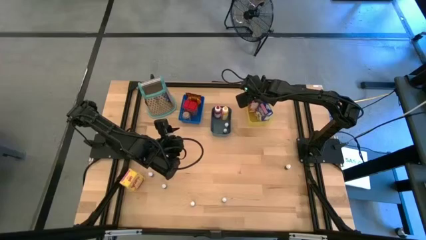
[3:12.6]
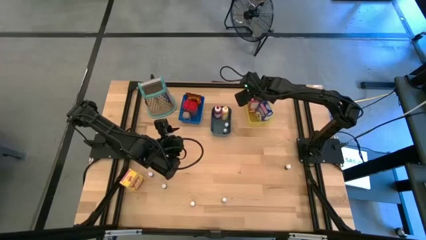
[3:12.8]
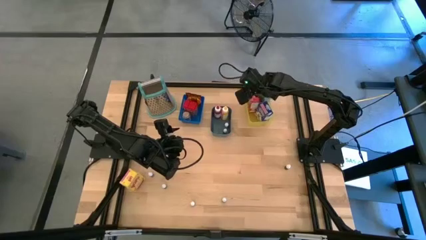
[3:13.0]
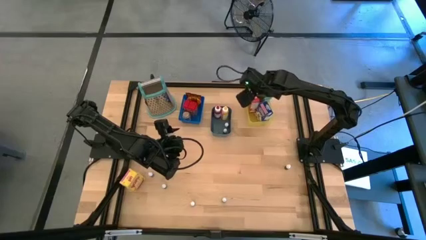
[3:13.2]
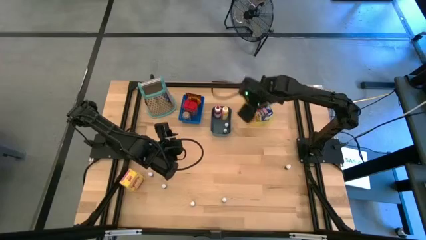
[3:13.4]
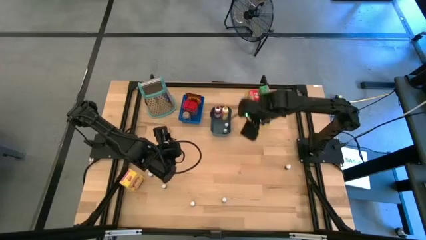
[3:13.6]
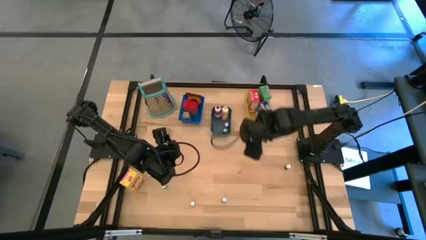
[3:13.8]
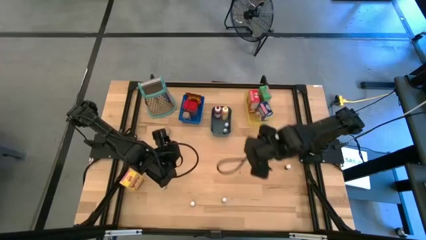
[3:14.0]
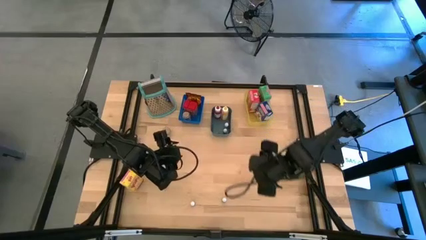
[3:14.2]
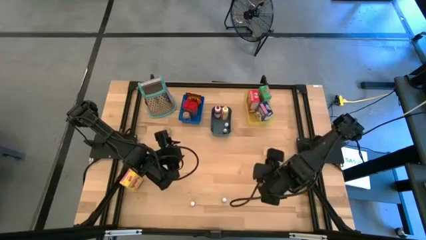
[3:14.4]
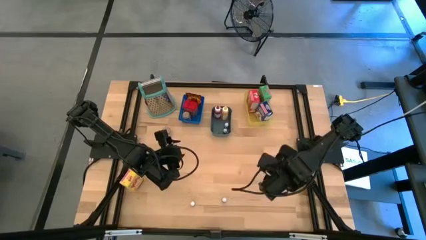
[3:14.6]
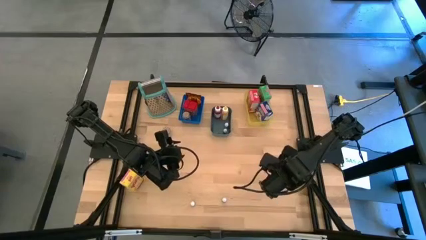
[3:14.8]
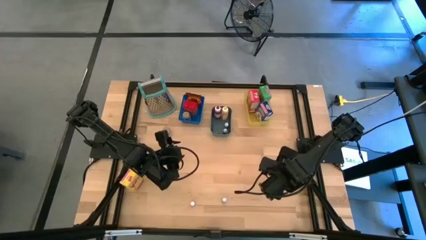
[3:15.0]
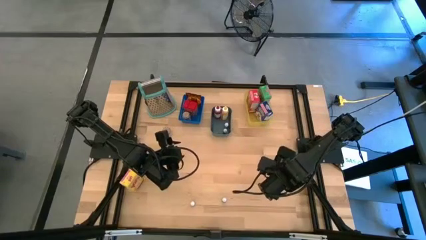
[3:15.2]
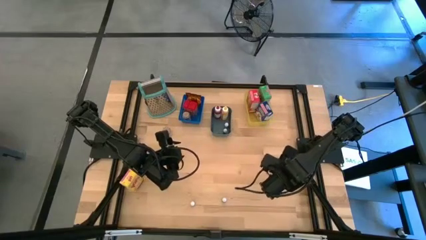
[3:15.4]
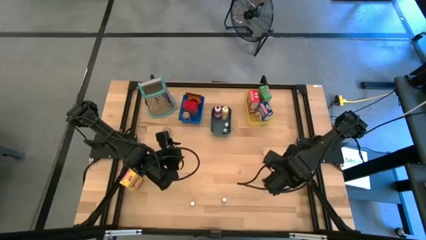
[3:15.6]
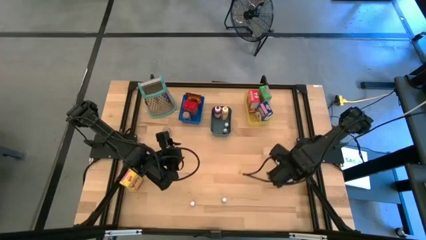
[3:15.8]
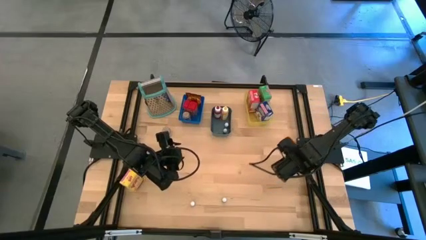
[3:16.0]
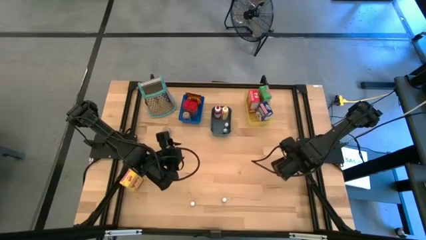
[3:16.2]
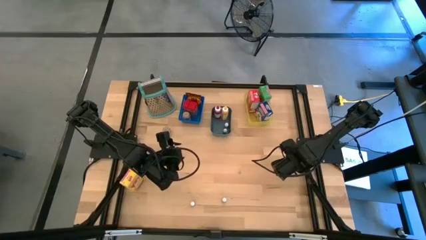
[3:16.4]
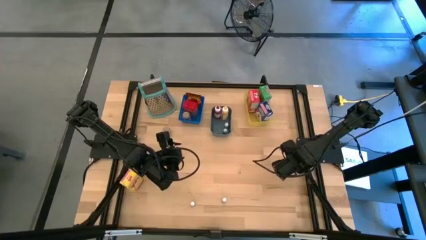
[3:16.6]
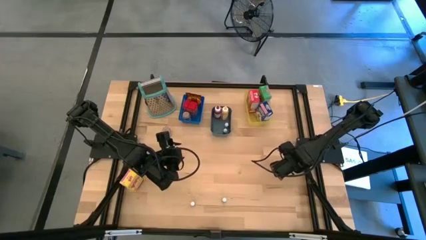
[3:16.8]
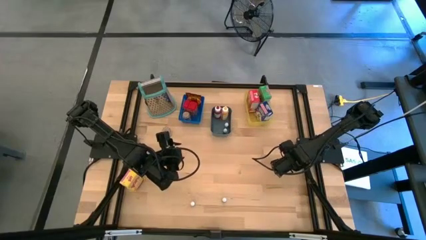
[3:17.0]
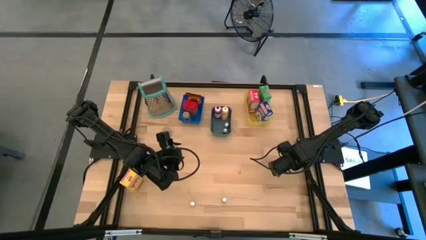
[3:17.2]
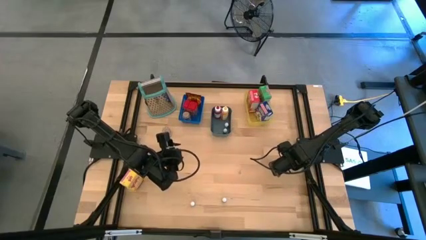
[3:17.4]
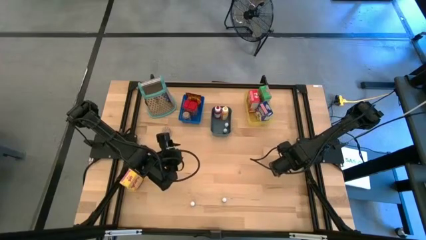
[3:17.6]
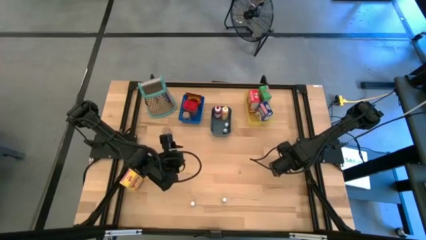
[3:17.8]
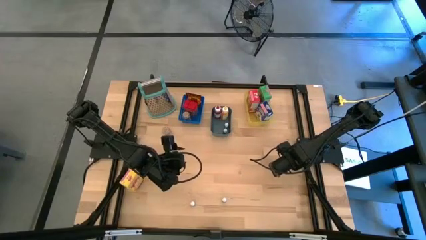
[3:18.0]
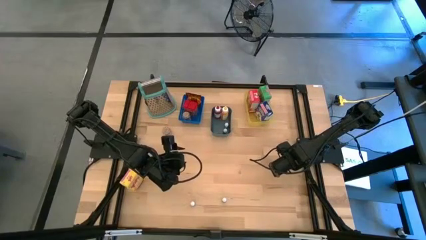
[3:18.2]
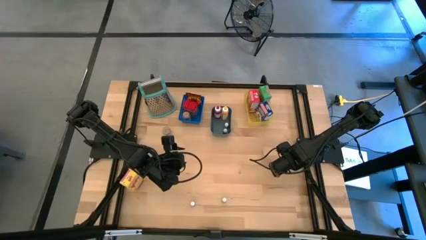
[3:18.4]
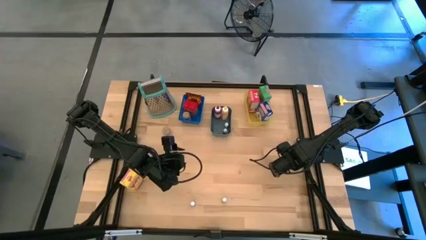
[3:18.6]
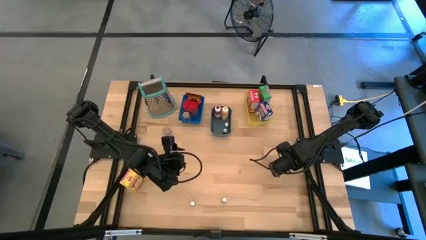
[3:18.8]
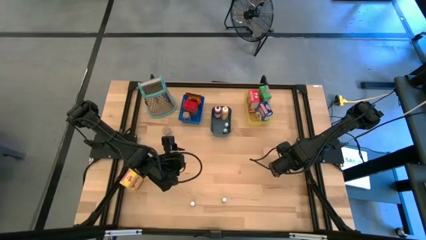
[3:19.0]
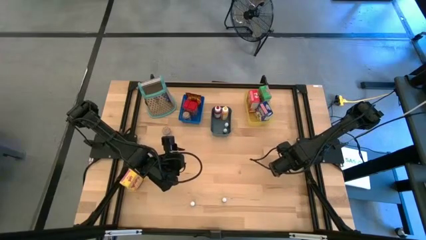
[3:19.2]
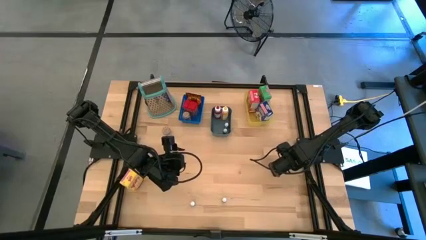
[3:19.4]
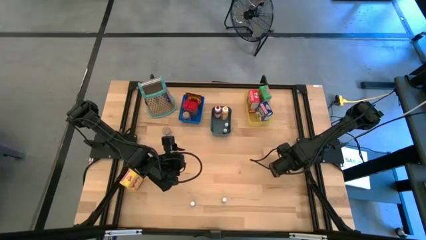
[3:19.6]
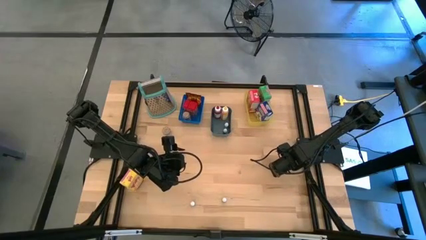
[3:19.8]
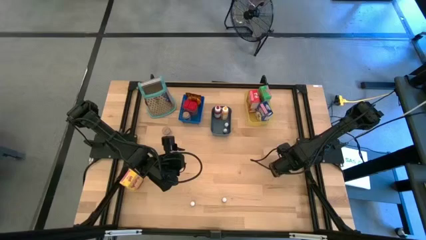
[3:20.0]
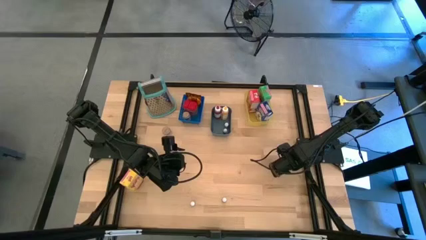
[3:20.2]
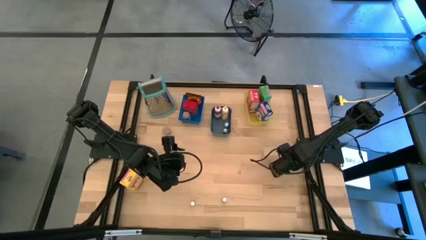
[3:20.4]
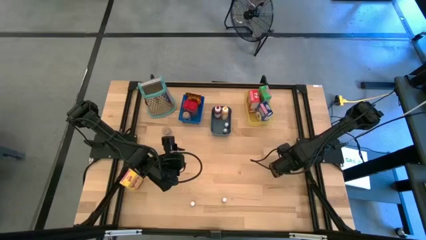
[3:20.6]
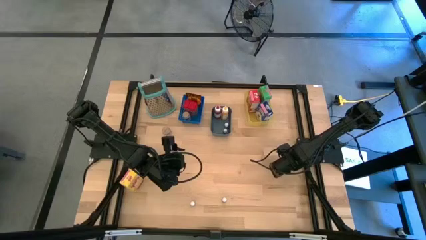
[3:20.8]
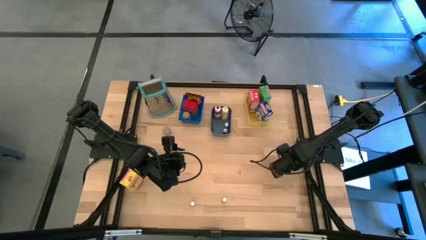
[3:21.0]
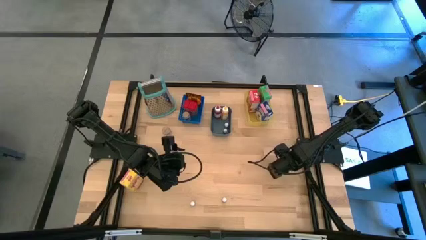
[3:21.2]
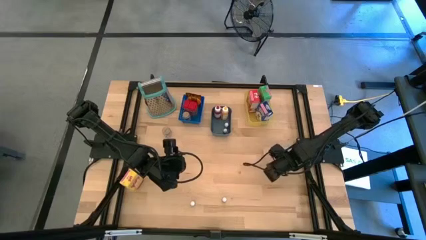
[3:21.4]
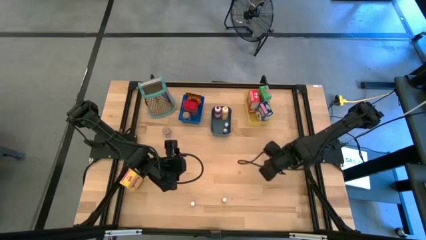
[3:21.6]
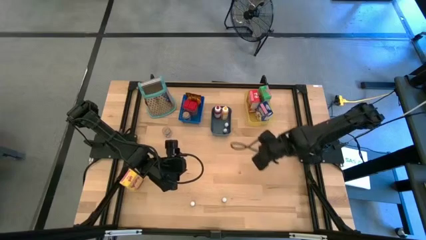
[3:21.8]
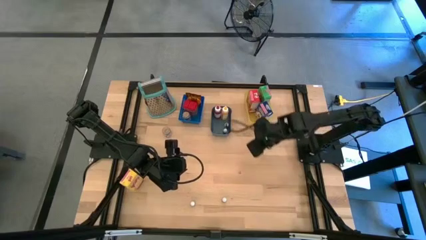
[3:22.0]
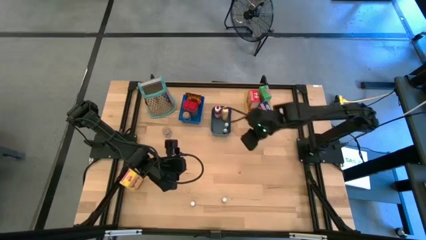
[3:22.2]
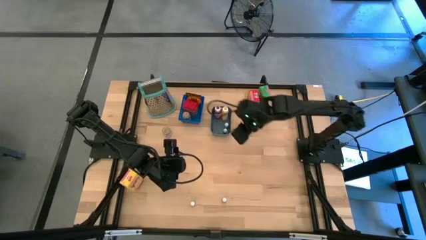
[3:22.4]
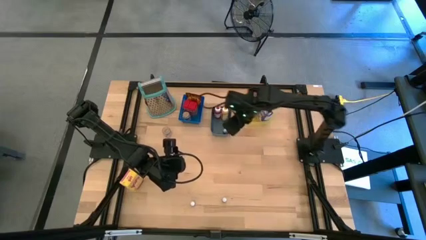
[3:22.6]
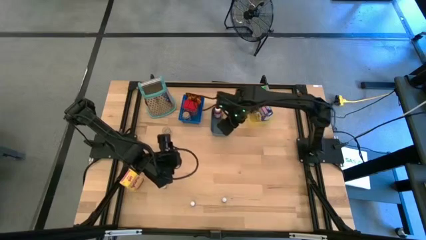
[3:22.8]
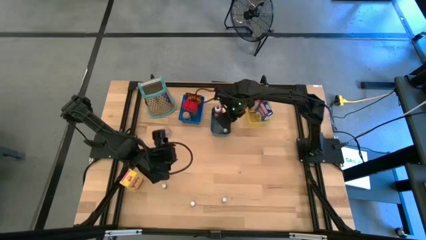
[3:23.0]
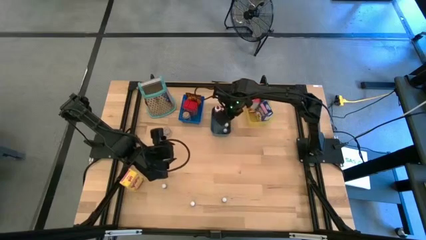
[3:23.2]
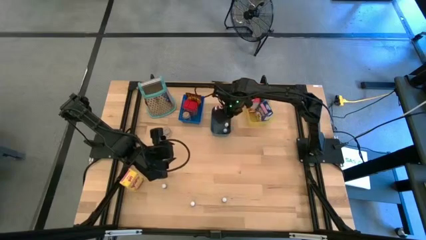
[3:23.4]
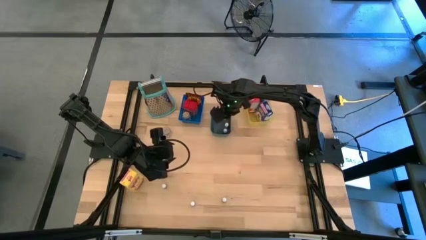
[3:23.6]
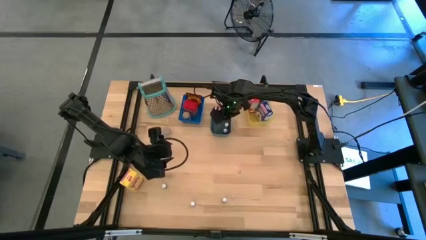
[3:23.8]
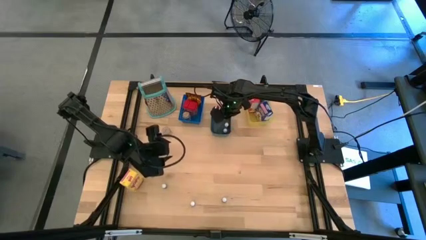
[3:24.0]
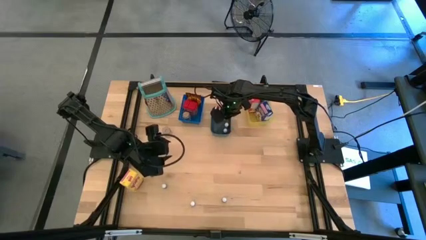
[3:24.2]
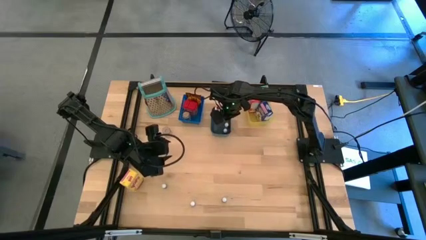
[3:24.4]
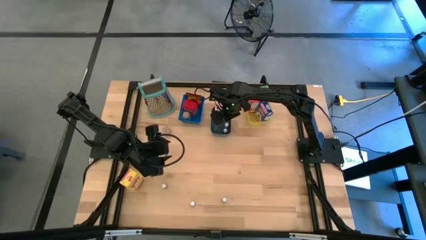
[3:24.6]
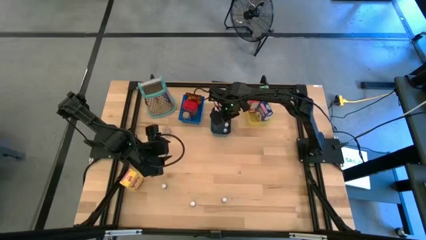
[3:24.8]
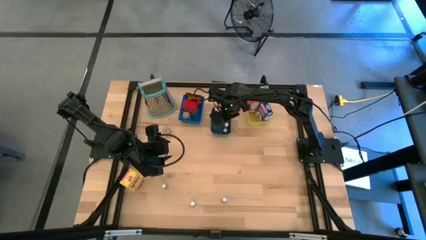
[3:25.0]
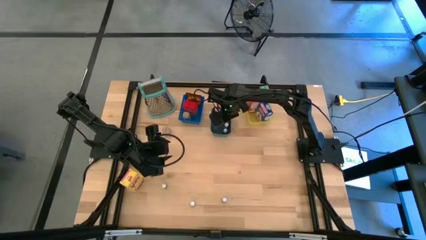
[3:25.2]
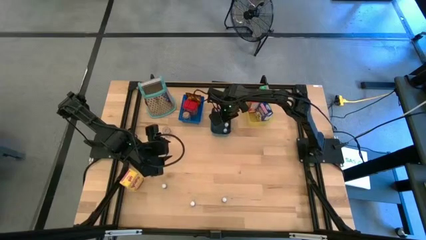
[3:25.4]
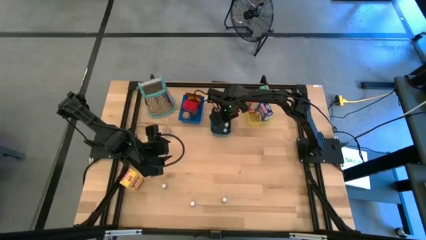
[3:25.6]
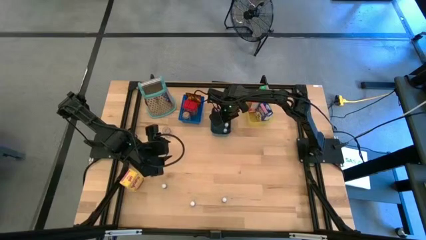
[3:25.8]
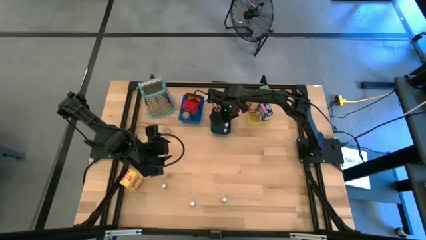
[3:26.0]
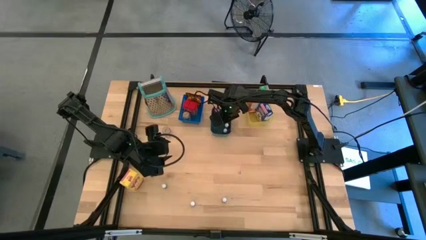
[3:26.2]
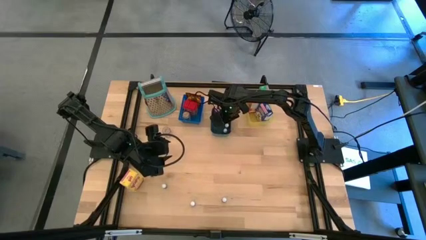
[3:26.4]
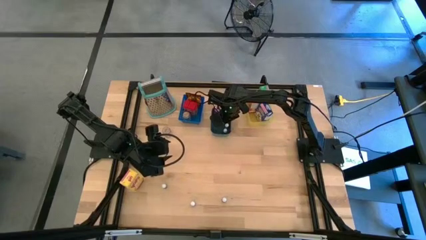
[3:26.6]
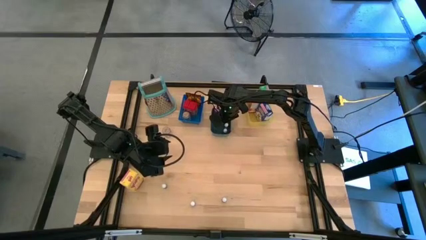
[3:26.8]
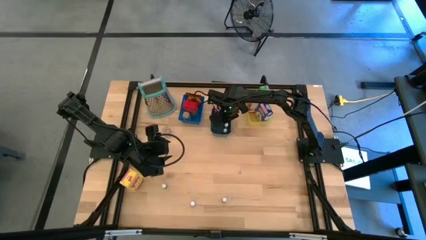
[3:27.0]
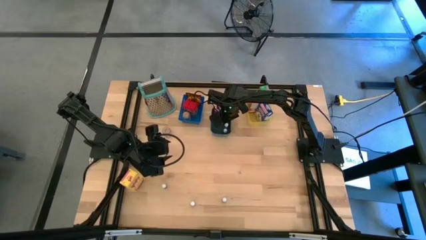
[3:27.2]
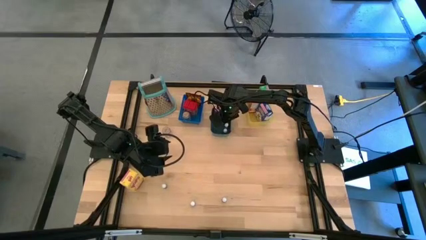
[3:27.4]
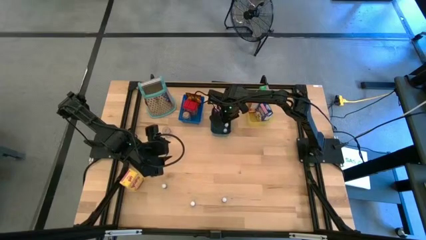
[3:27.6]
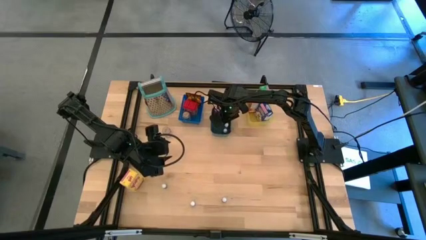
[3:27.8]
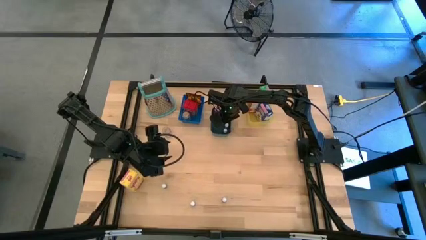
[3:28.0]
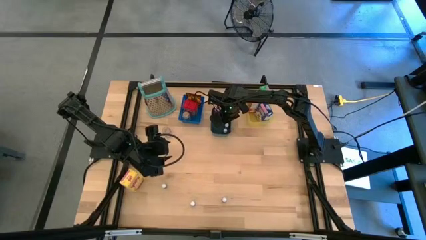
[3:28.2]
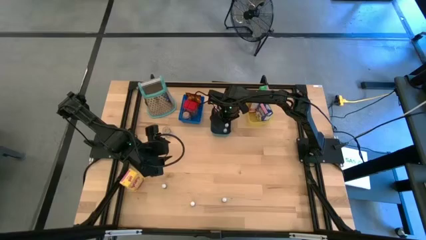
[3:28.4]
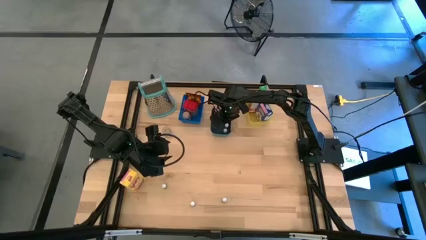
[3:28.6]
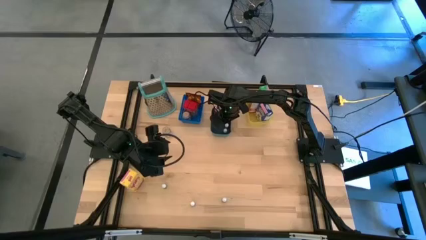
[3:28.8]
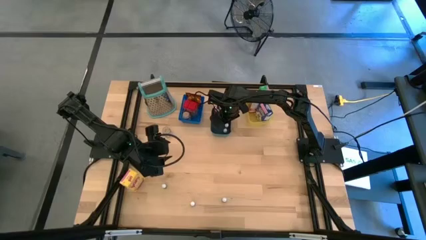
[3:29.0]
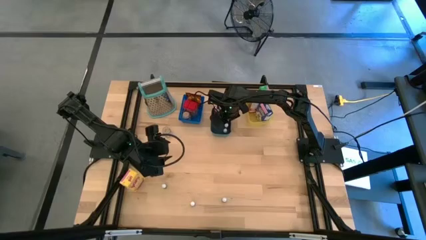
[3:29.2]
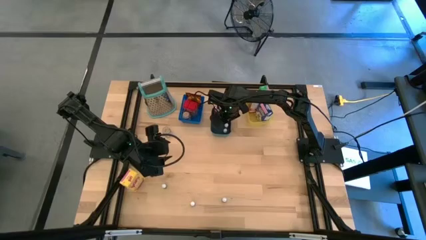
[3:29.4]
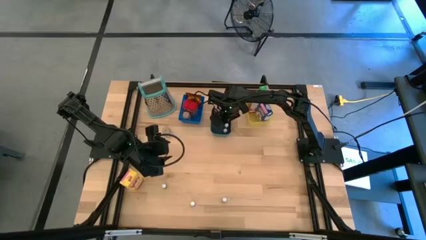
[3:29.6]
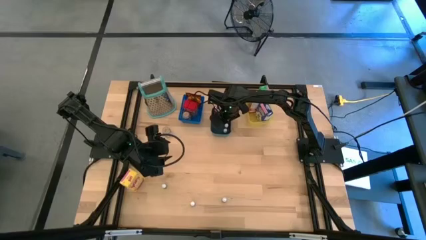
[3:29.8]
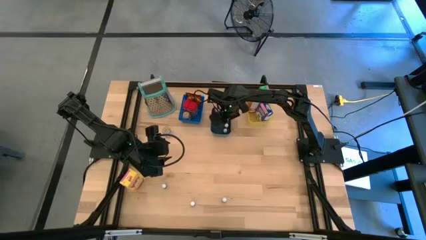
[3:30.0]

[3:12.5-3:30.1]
Task: Pick & Place Kitchen Items
Put the small black food coloring bottle into the dark green bin
